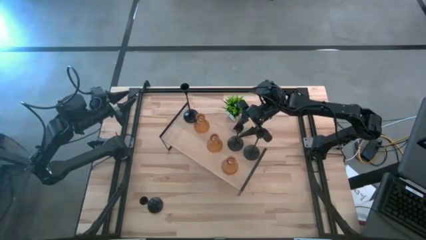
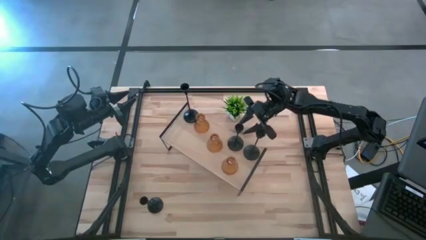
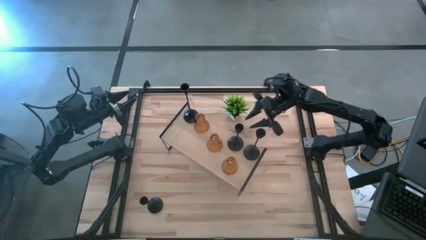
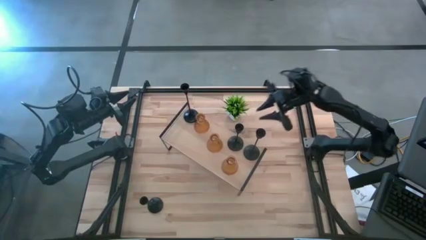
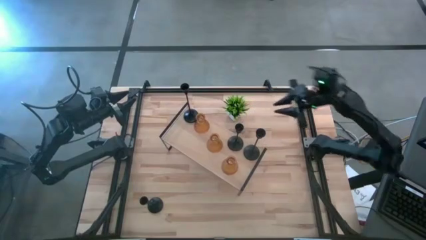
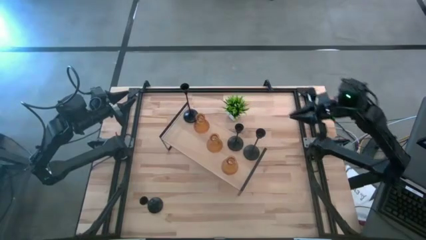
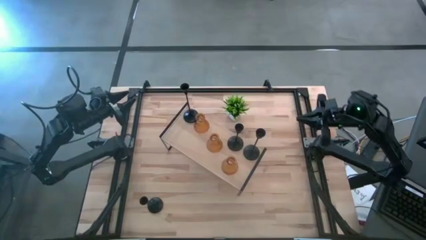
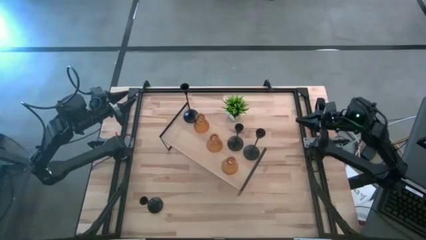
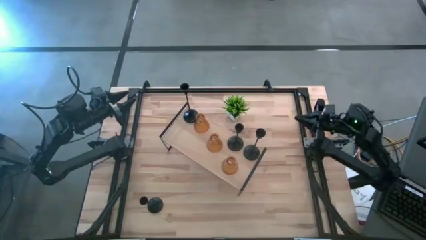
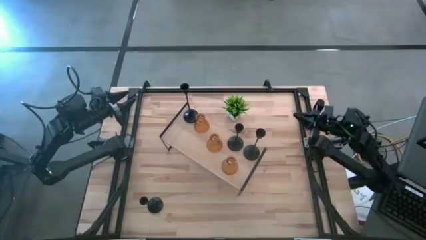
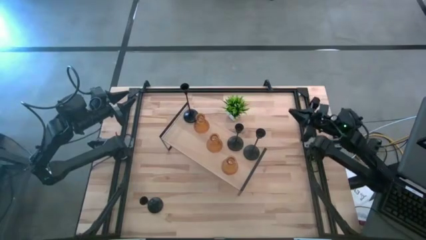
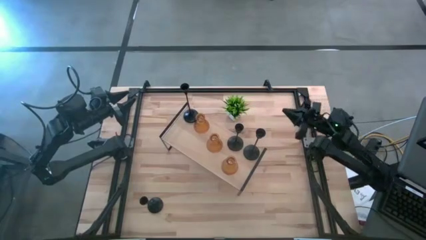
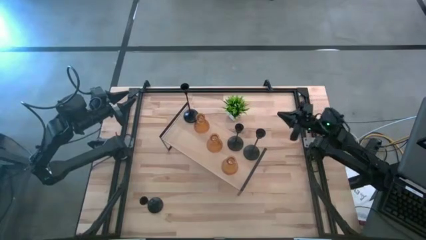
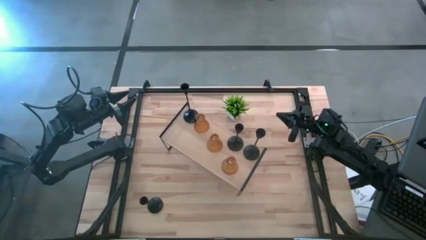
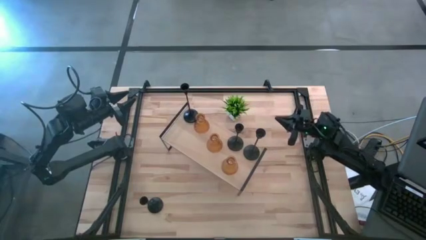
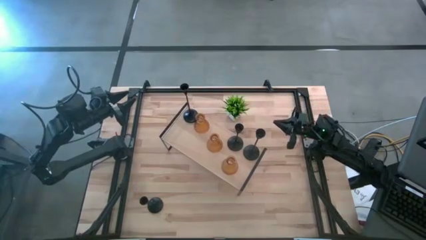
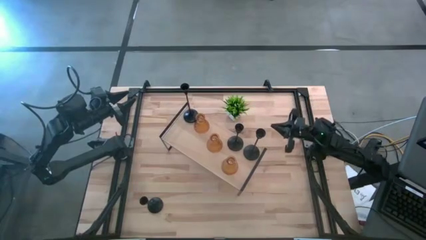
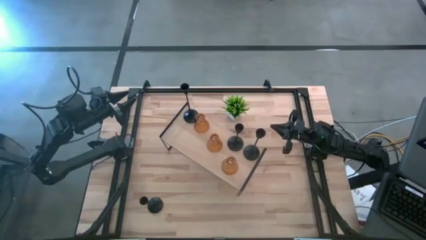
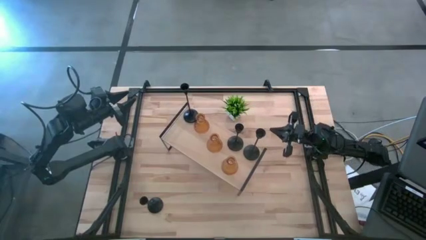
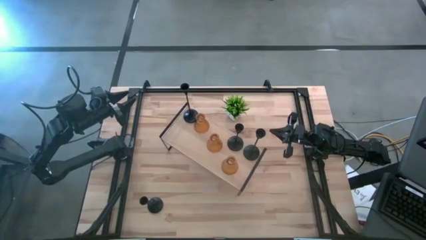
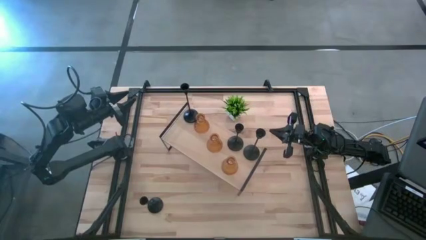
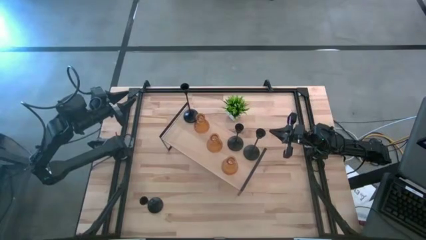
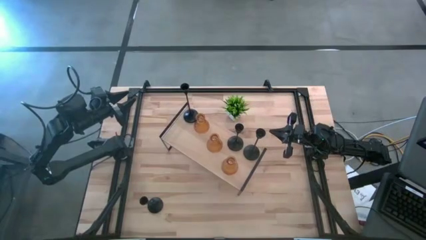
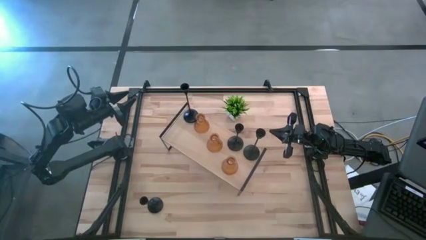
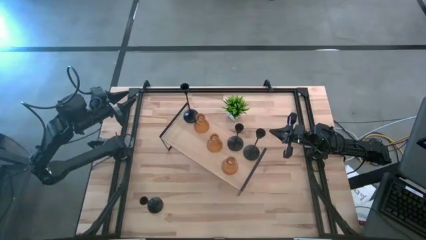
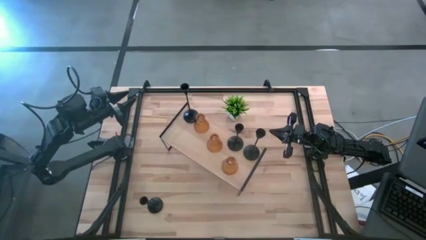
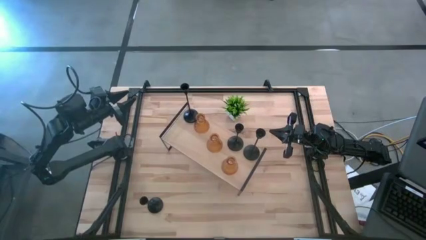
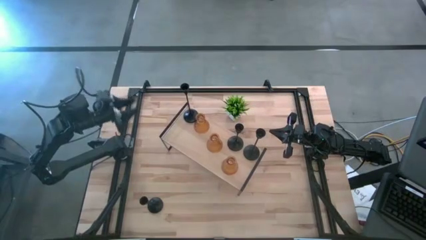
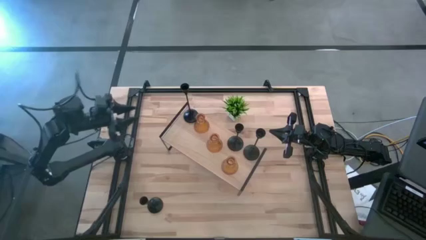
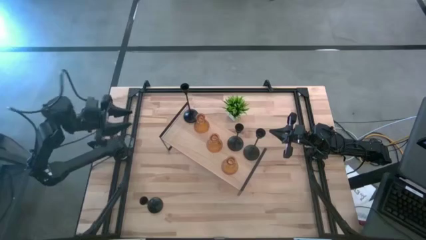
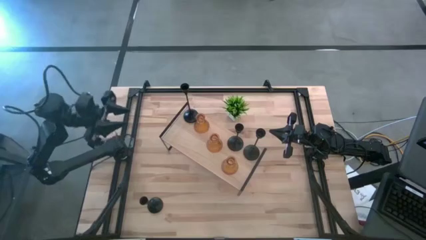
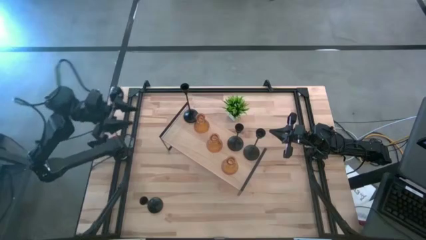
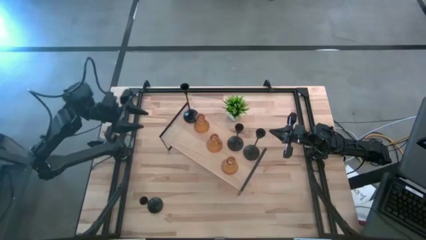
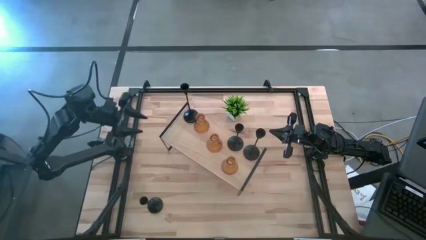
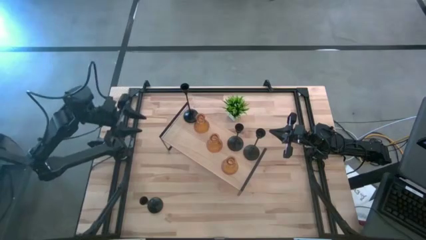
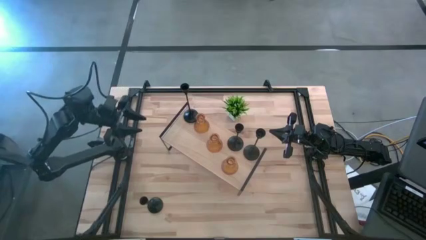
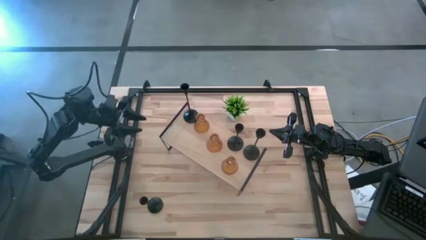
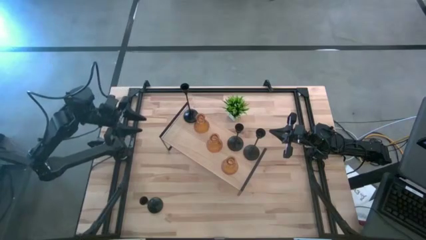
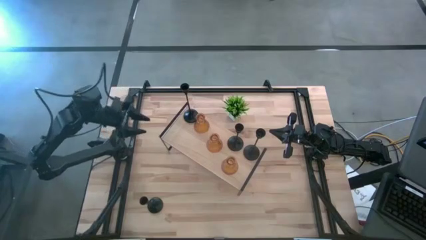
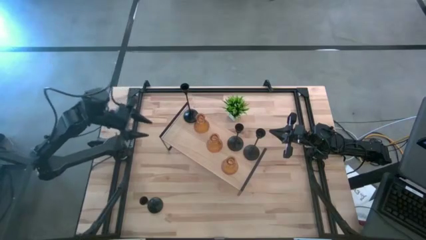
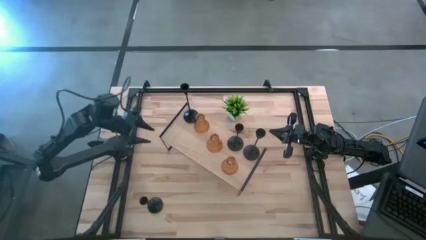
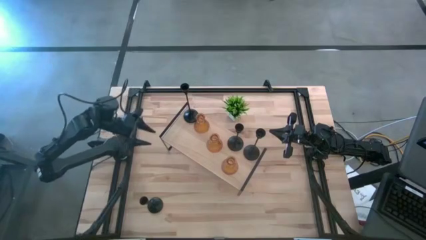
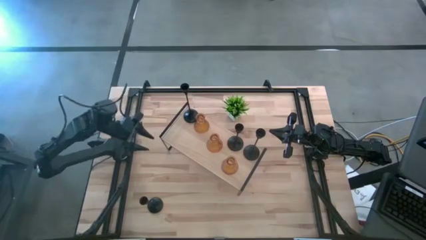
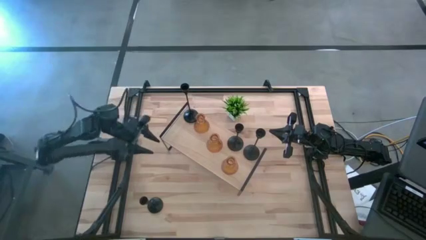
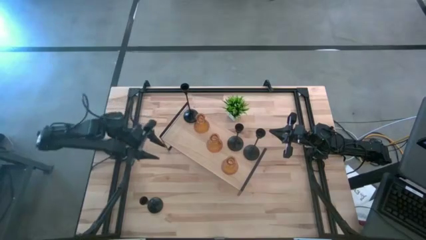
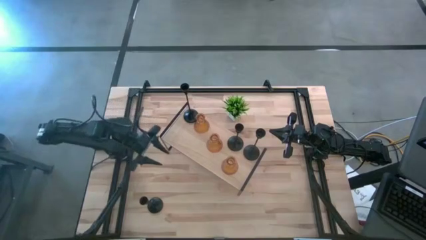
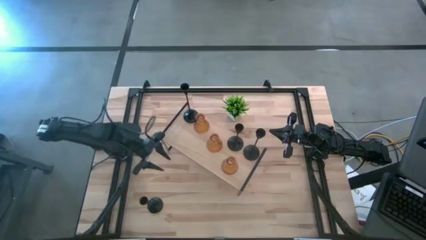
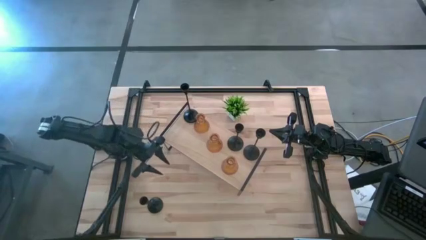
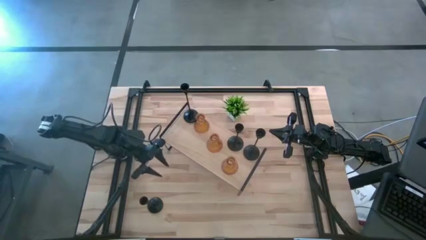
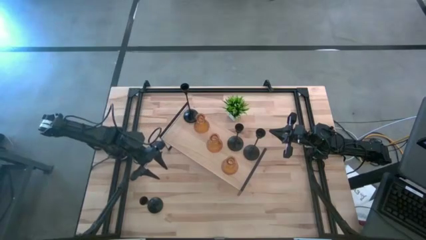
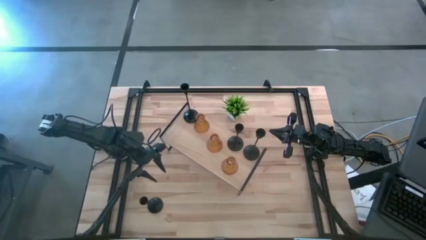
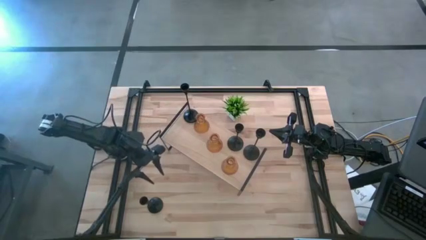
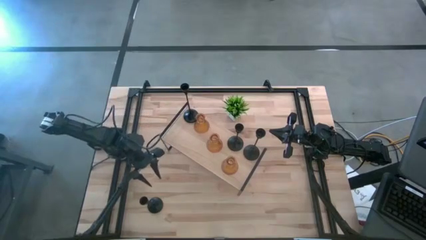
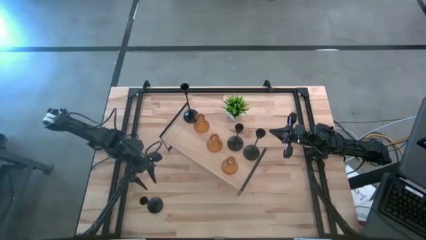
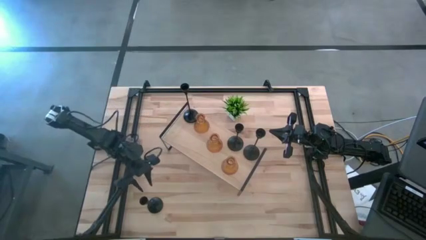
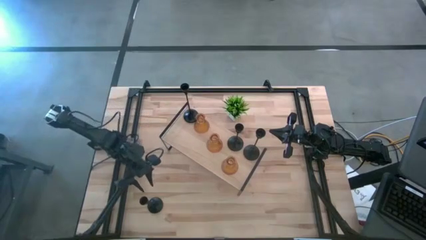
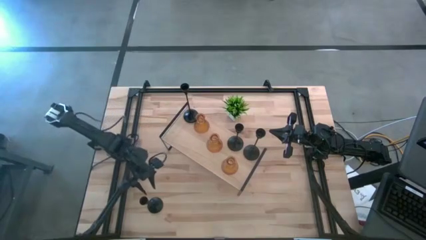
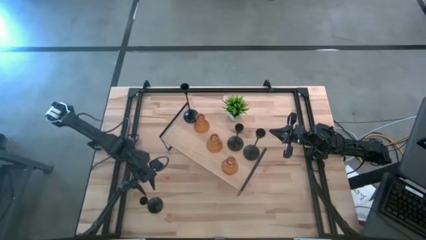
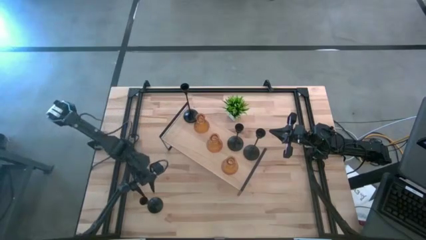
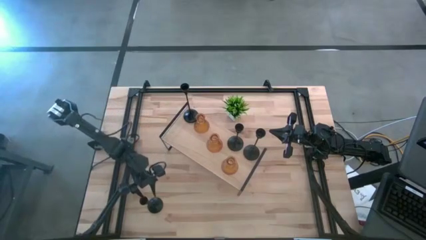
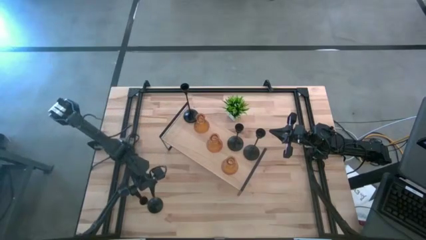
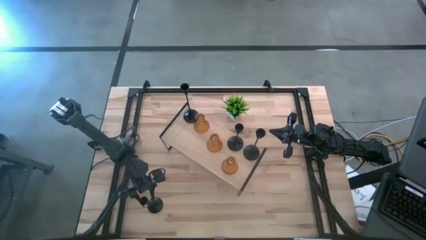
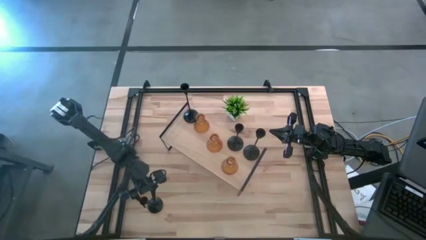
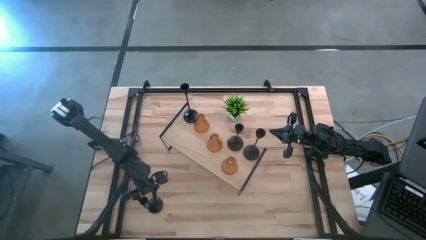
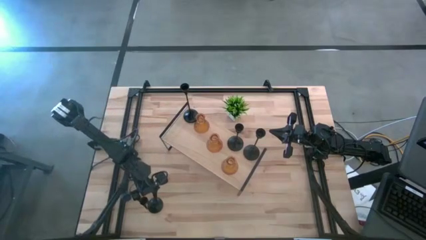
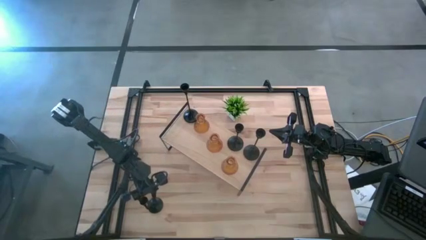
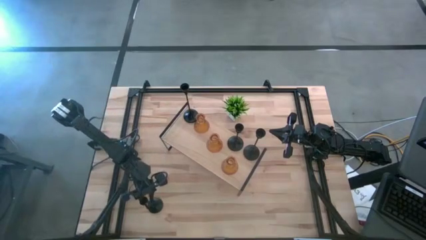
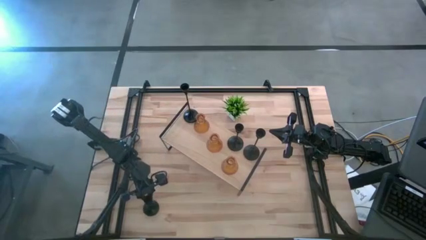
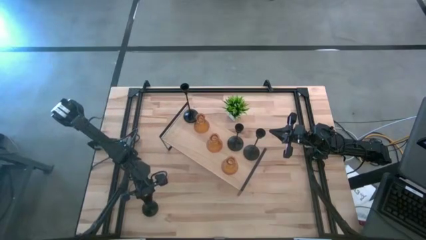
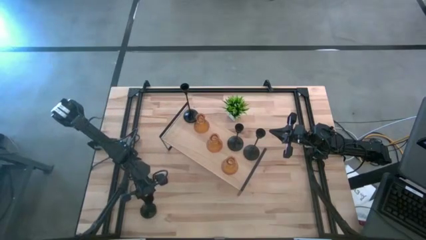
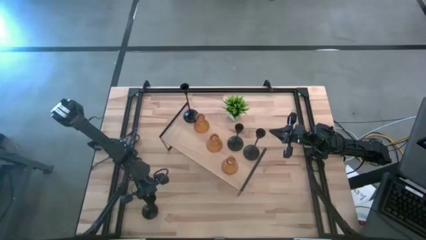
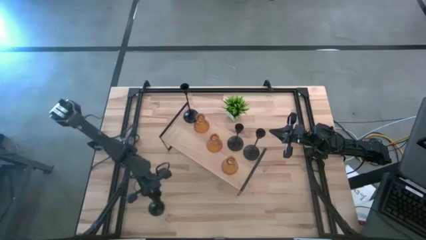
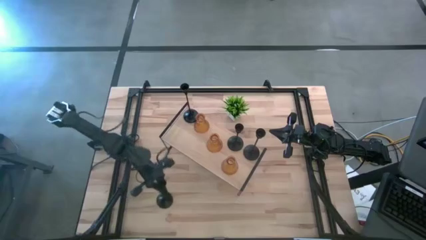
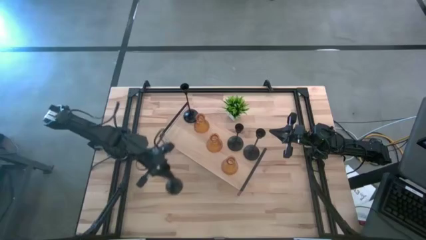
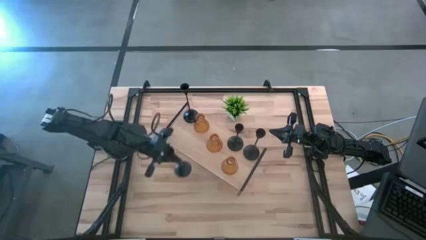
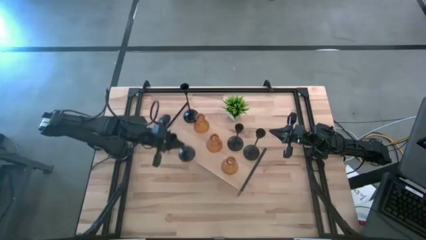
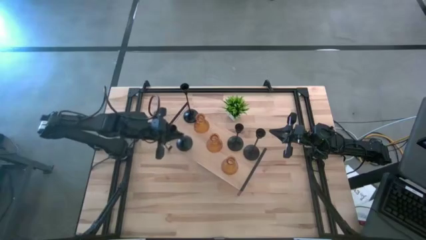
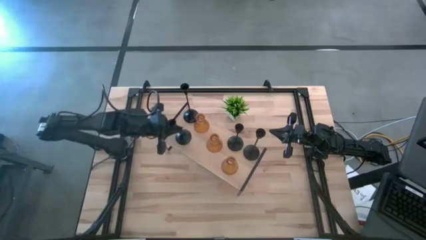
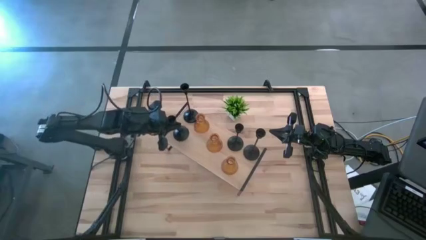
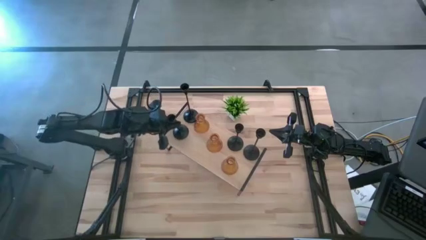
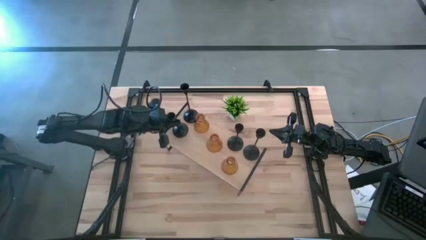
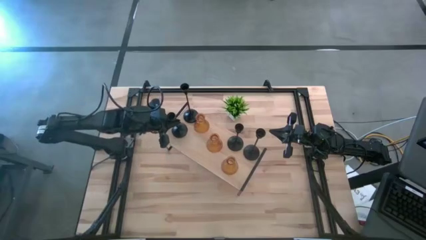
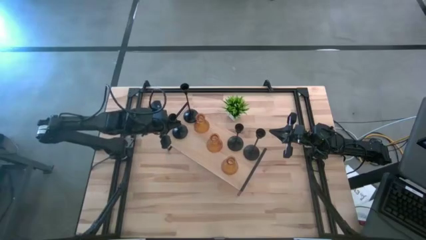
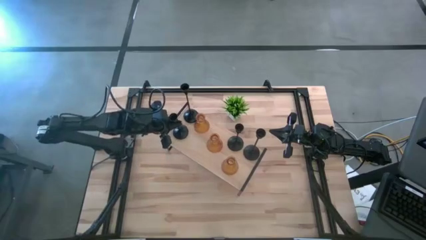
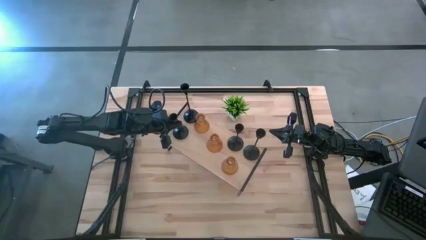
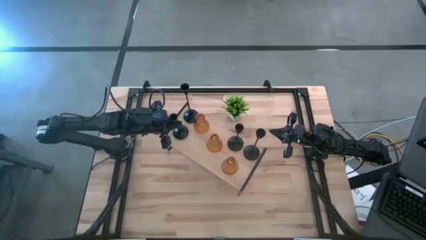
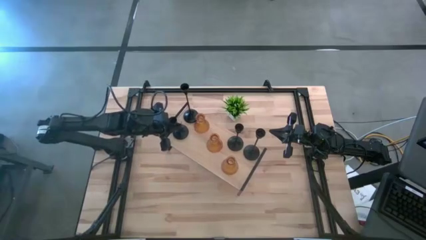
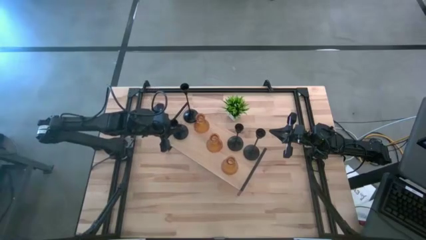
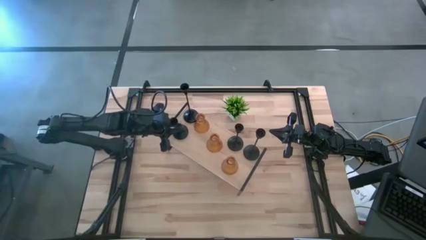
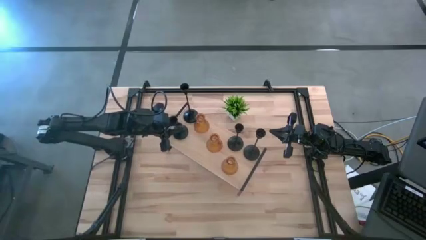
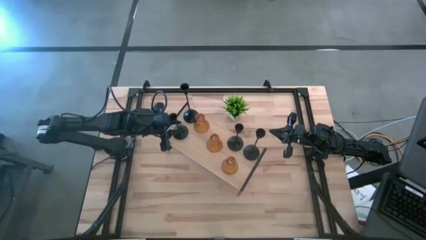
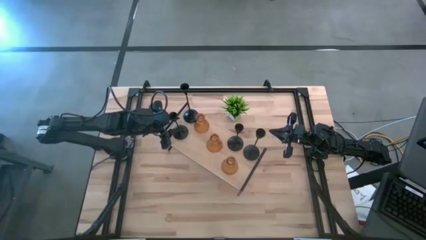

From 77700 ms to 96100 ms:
Task: Pick & Place candle stick holders
Put the black candle holder on the shelf
